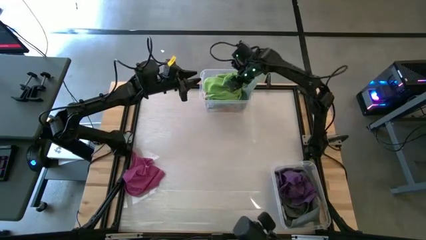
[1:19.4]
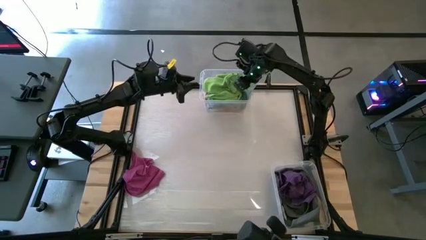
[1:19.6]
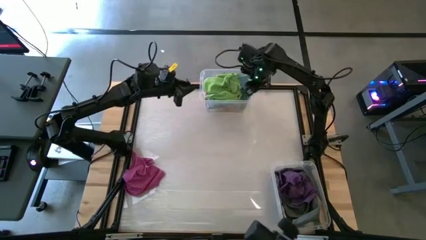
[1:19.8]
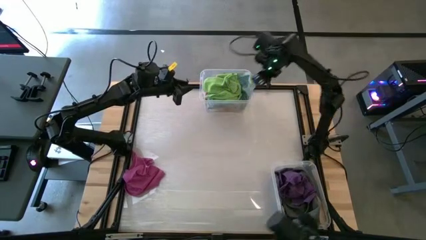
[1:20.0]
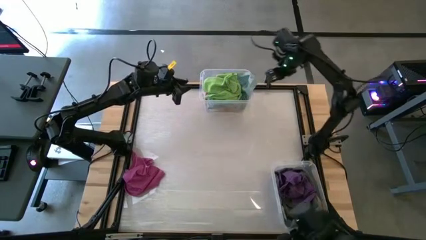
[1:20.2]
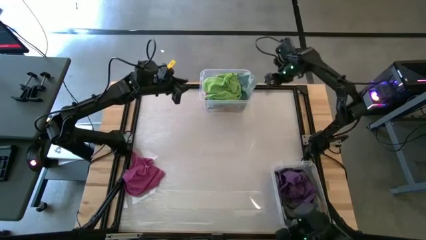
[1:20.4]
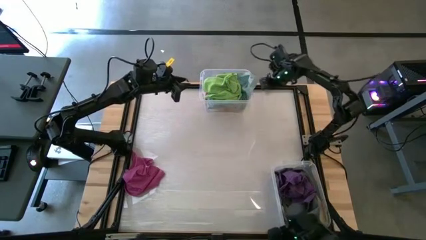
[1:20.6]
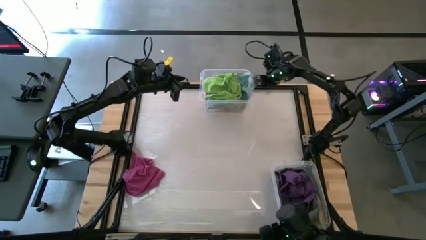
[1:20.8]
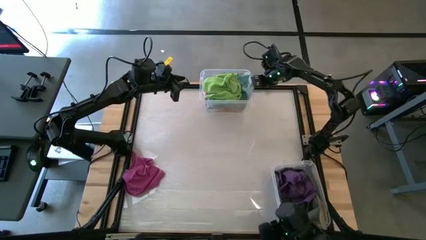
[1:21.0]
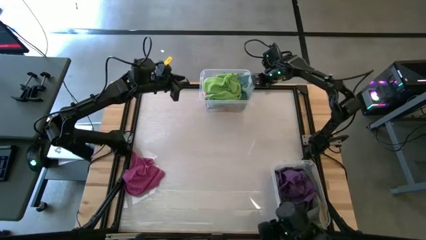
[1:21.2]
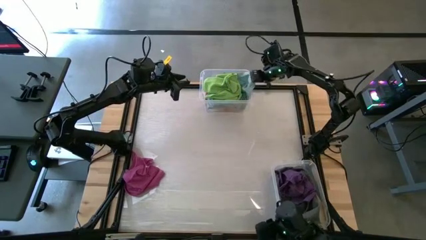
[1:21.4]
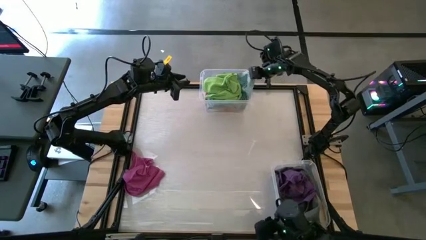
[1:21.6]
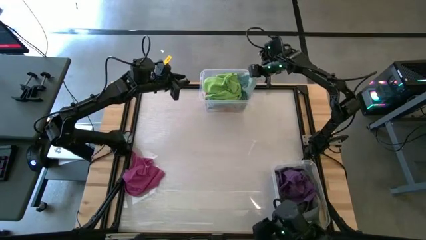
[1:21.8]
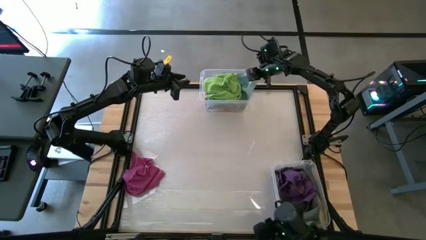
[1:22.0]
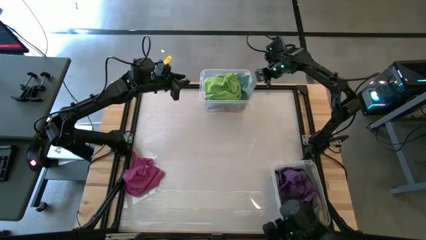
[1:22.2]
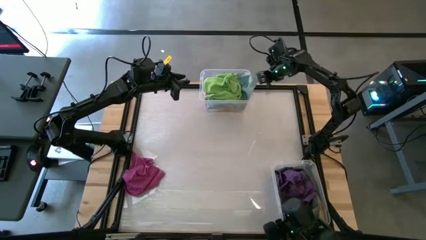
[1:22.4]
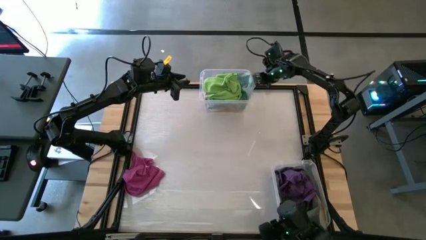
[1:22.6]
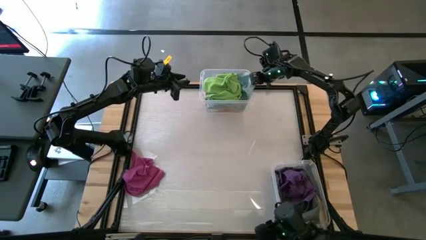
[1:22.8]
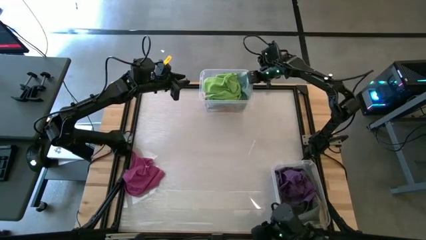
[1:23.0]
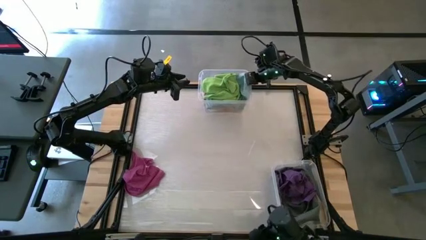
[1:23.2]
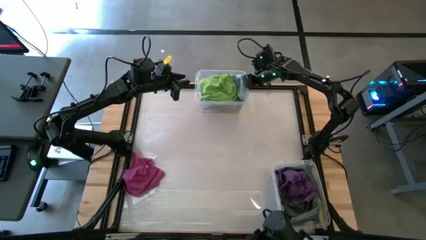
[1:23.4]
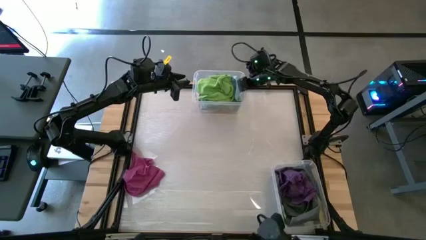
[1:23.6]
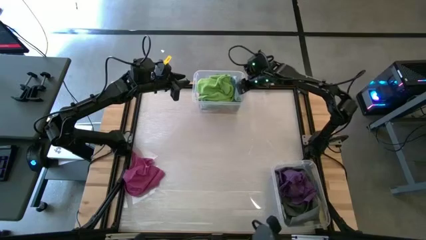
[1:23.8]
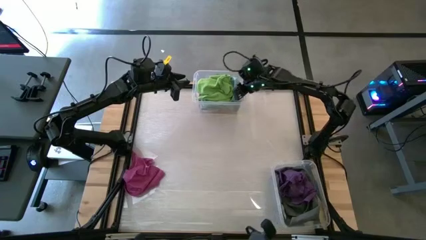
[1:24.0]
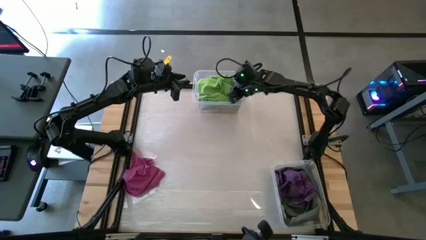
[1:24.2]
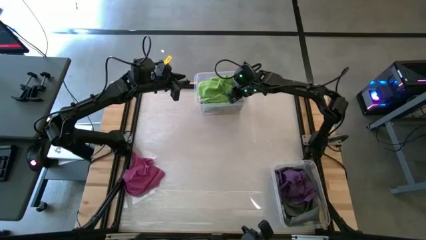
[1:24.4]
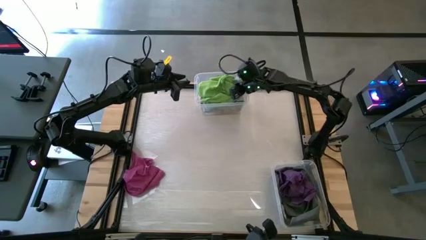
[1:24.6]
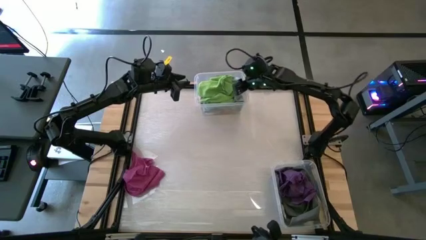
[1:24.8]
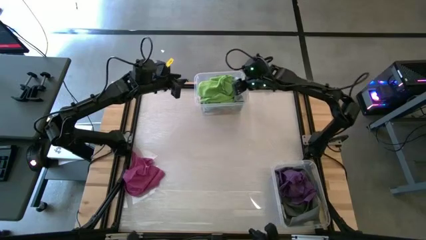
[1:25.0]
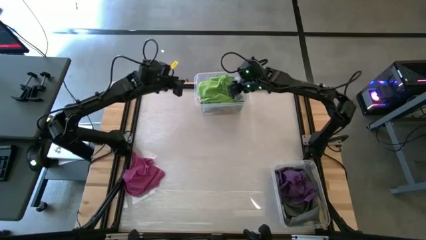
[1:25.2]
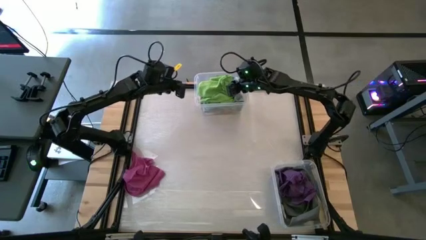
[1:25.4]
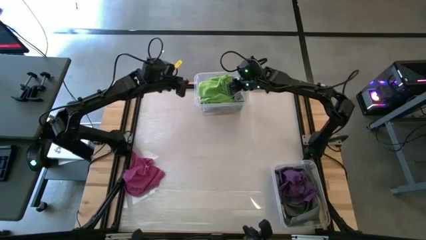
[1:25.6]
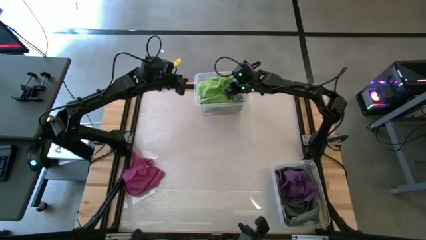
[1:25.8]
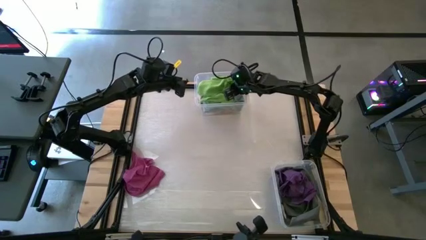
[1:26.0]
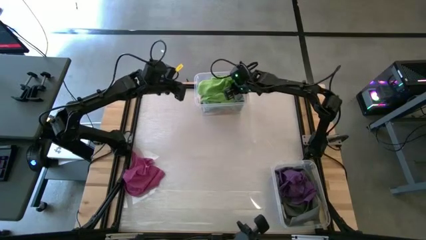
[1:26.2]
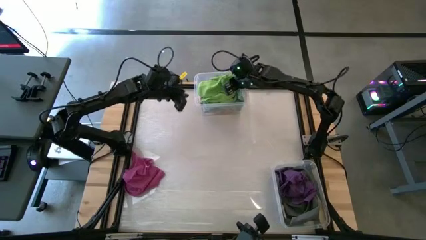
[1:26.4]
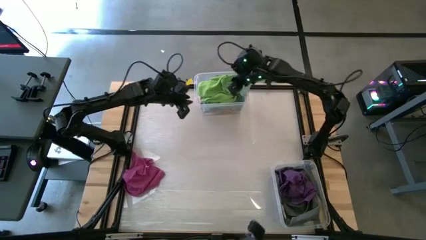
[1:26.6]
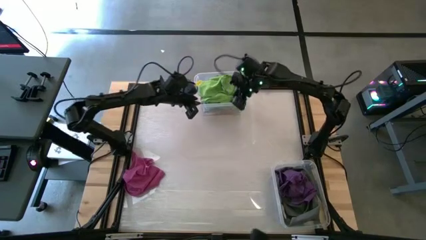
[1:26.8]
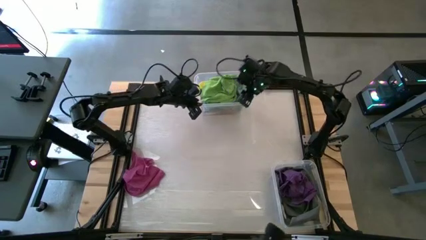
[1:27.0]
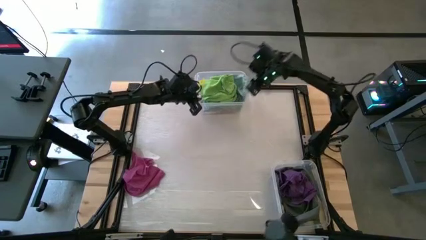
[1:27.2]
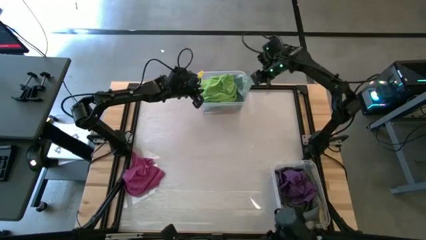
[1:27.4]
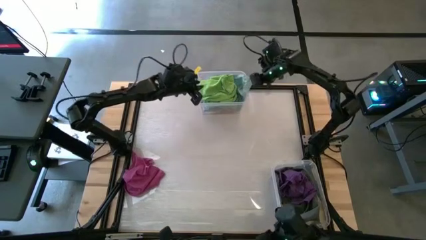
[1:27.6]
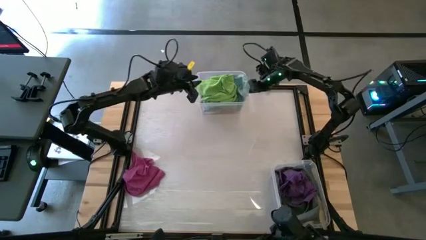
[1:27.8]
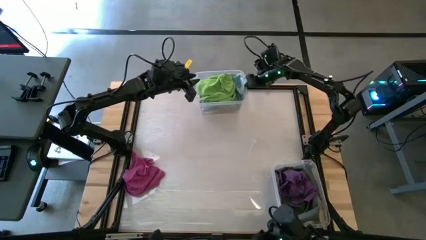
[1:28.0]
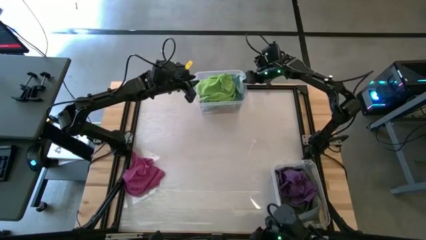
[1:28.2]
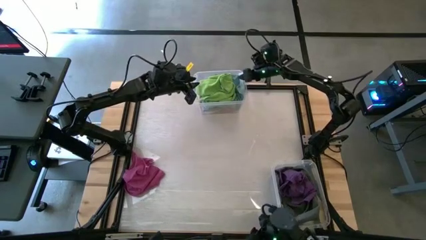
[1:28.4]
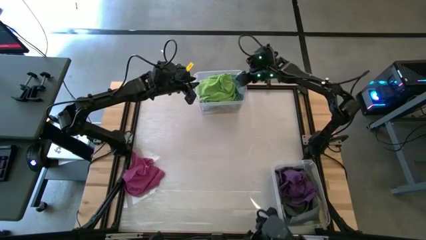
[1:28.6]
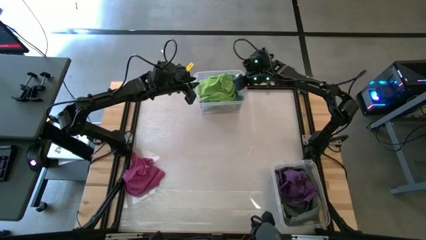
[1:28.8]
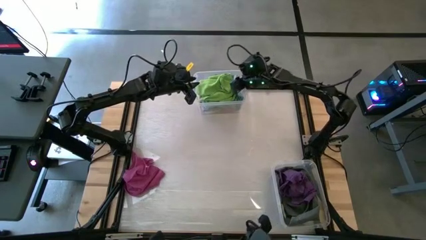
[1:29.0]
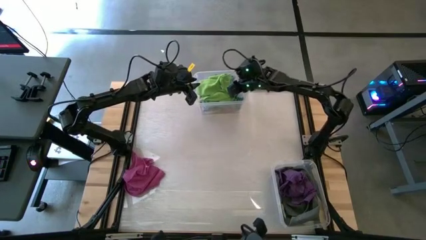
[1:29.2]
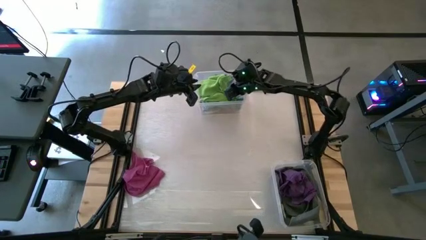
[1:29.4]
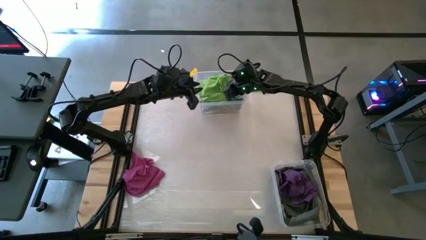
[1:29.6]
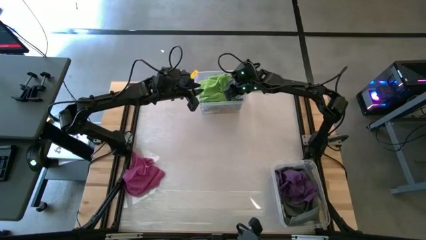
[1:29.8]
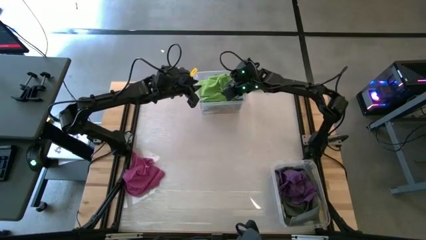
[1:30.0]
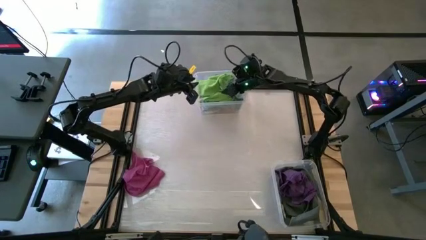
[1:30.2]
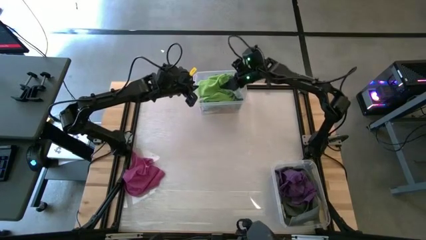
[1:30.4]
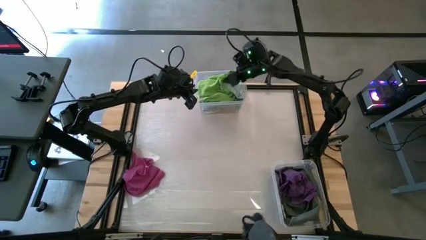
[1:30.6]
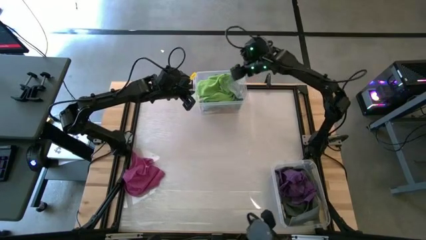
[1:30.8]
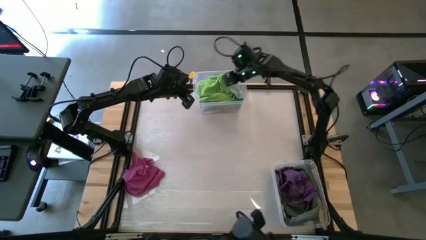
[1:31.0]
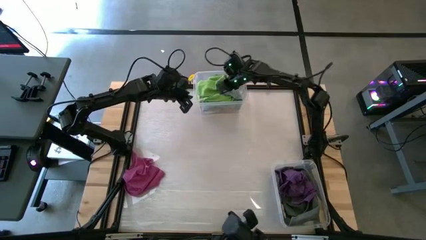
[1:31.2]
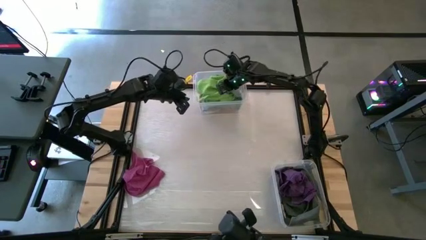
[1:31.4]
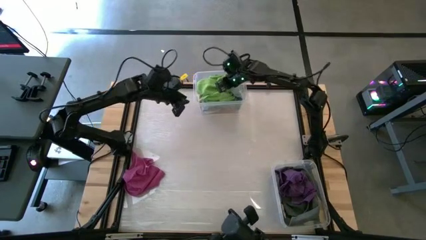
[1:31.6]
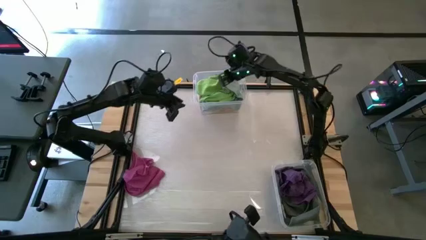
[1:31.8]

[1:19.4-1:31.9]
Task: Sort towels by color in basket
Adjust the towels in the top transparent bin
